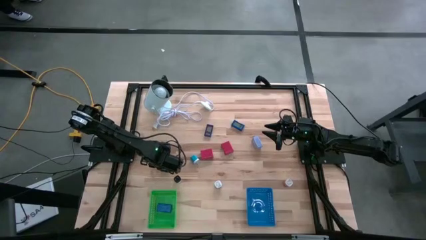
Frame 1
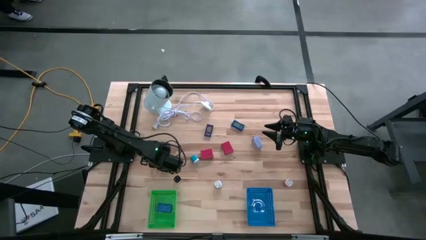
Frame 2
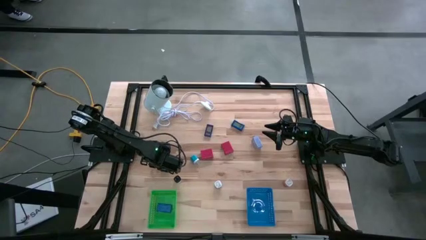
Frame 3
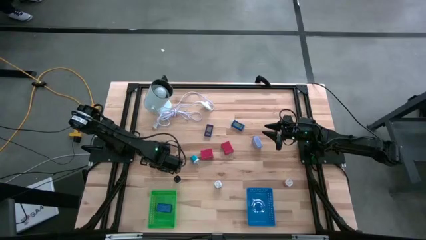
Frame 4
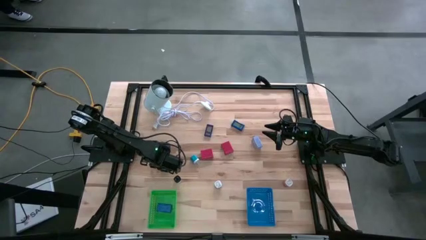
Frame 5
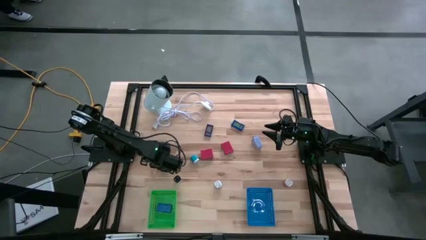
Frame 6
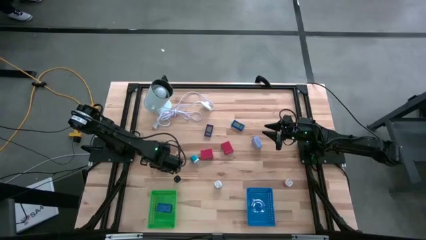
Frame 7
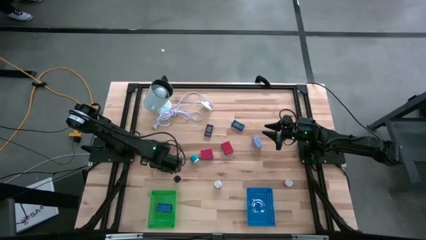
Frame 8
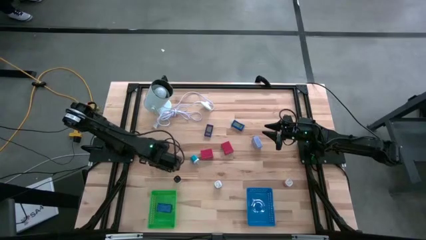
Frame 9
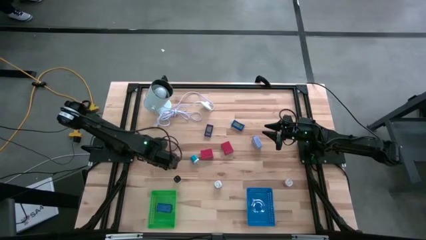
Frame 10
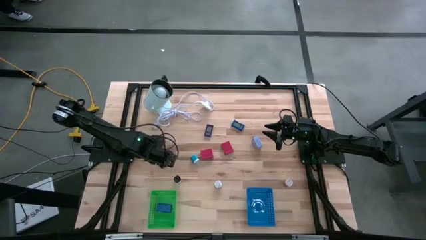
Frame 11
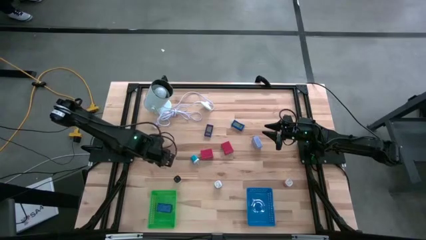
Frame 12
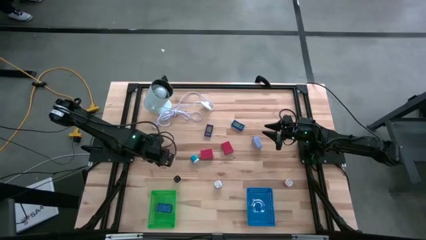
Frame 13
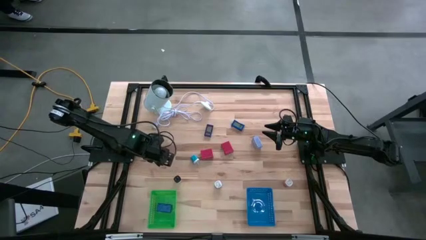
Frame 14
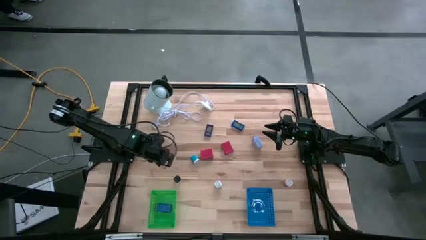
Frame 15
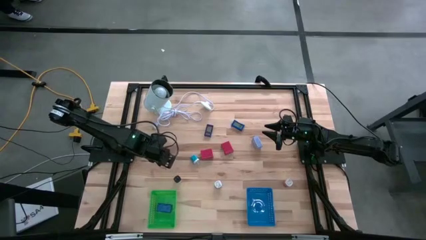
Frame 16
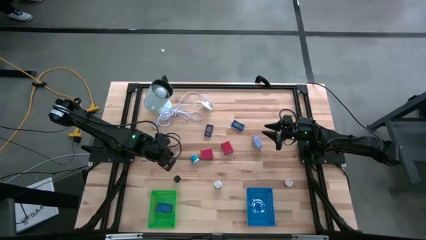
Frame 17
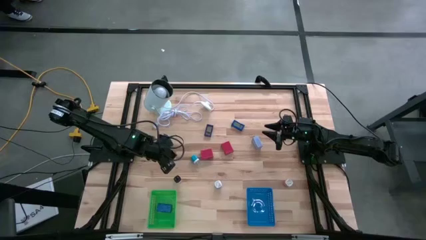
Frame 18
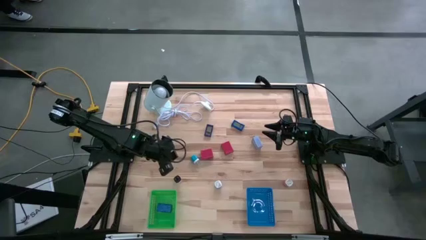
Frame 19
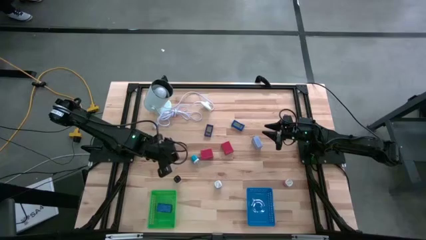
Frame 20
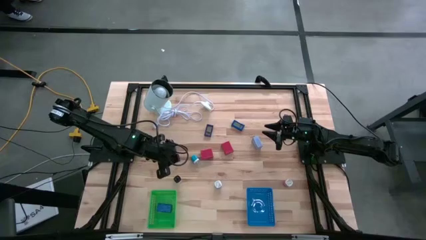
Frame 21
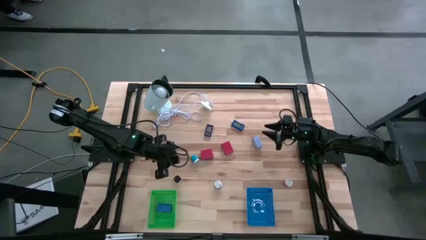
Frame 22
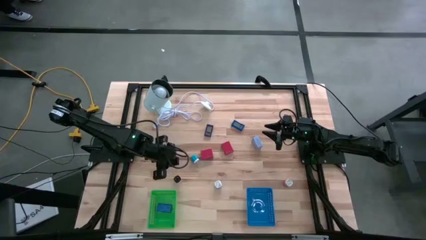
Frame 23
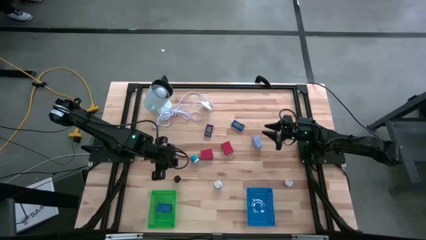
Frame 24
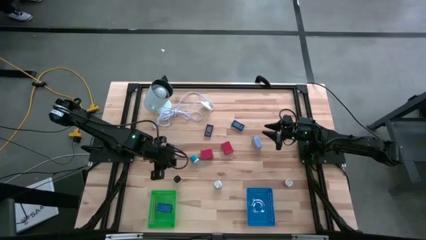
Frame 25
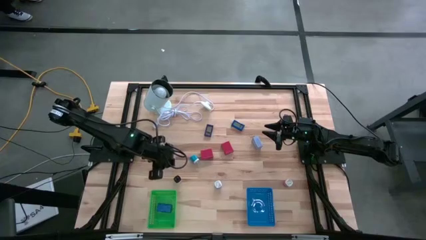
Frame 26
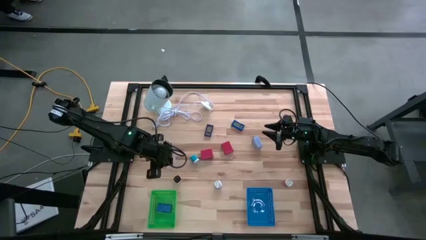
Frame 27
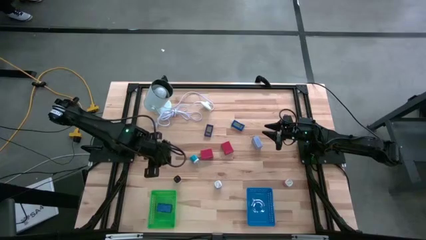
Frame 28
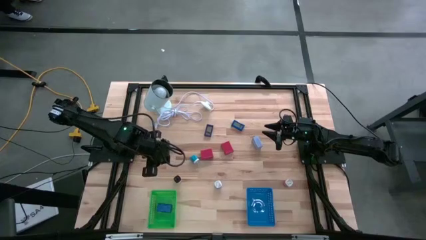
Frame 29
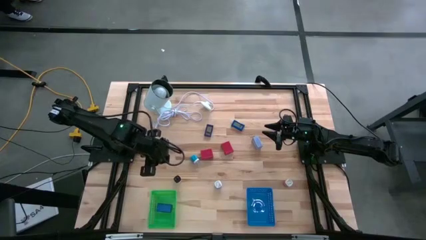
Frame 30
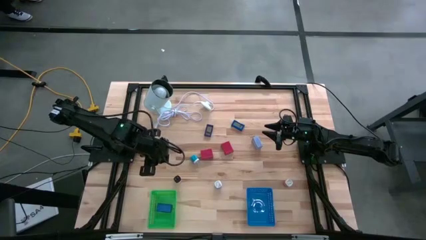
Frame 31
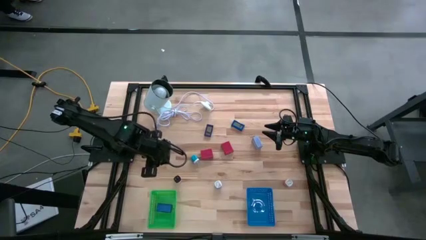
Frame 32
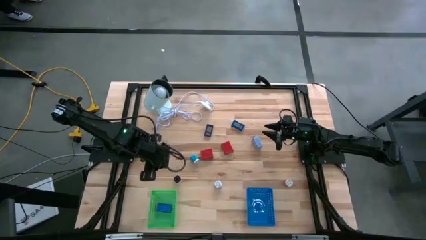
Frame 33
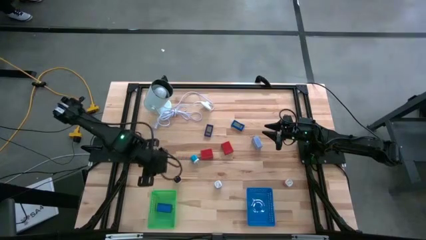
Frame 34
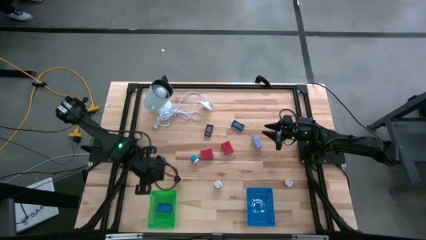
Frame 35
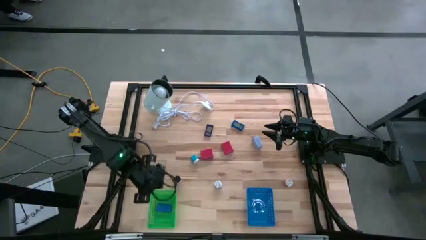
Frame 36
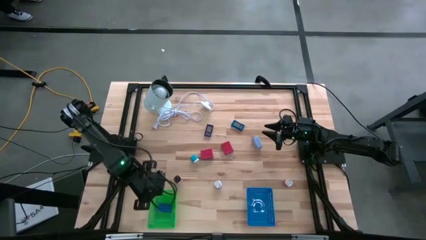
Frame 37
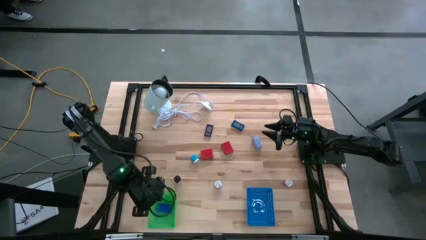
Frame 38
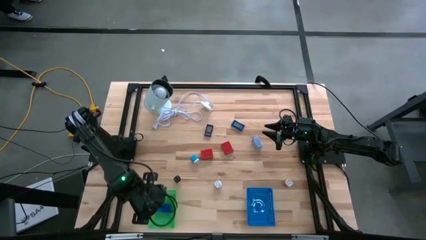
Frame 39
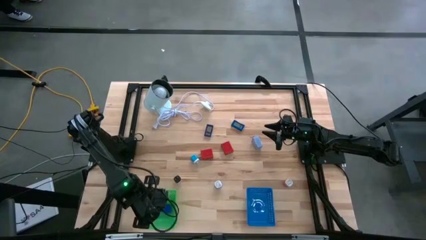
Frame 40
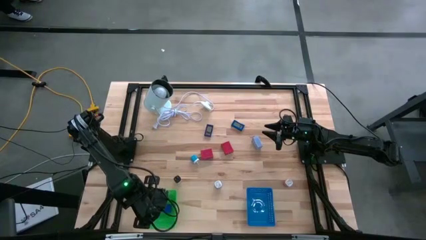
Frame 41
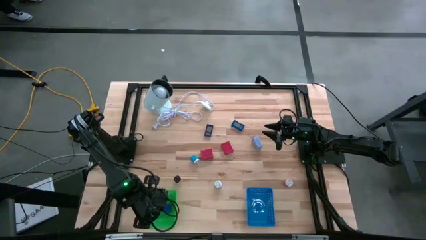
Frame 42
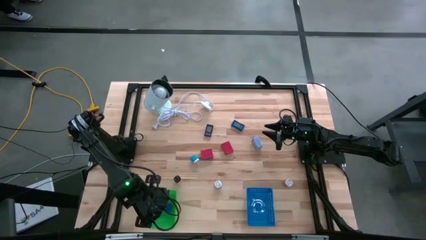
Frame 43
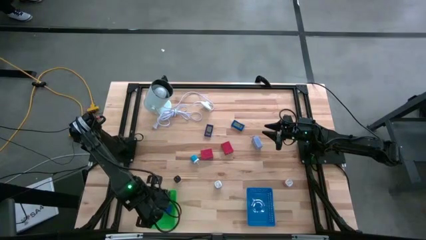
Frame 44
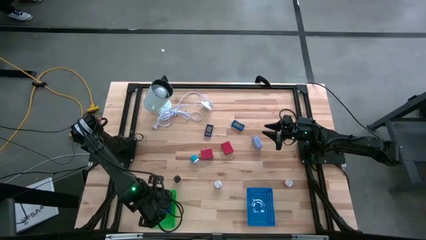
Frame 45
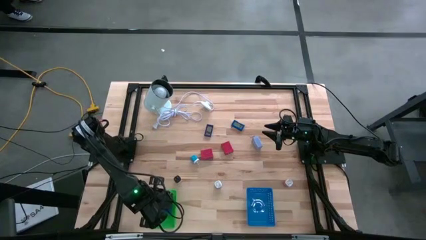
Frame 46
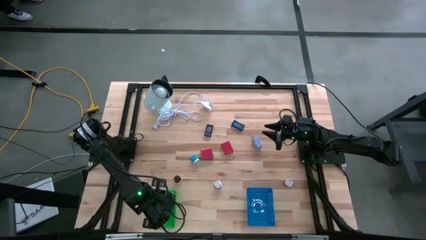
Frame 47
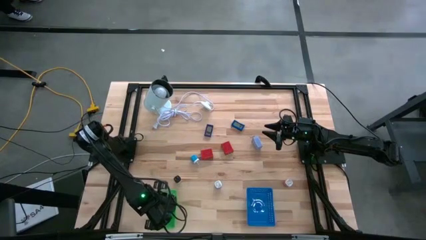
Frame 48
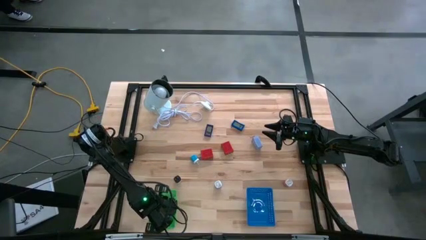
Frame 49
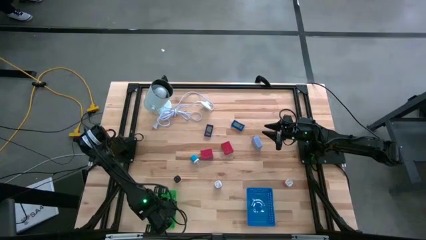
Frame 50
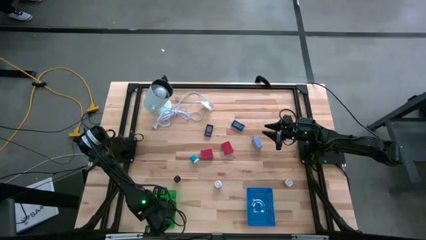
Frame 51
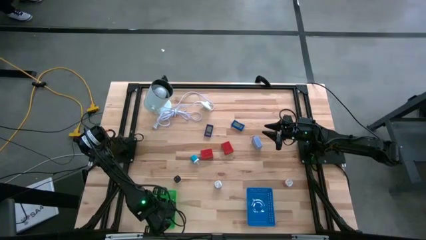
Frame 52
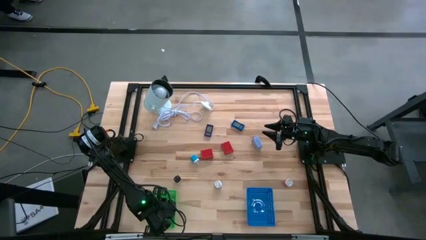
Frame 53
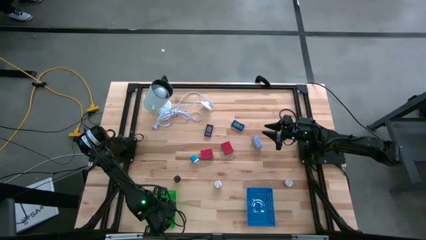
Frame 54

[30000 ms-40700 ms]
Task: Pick & Place Office items
Put the black digital clock into the green bin

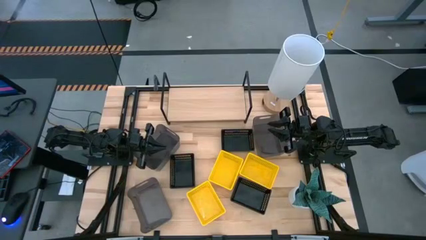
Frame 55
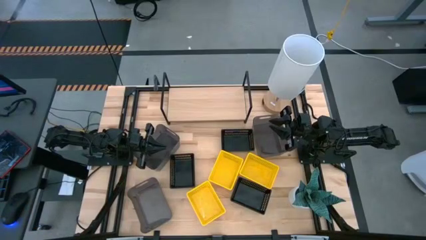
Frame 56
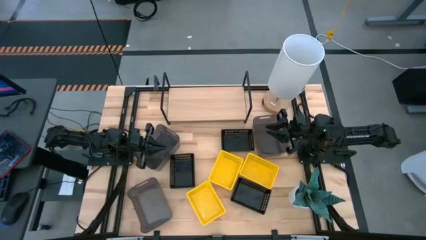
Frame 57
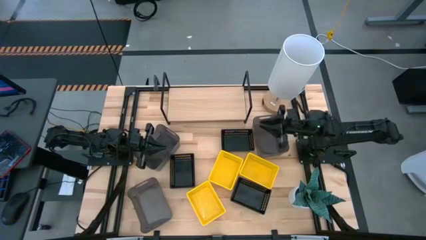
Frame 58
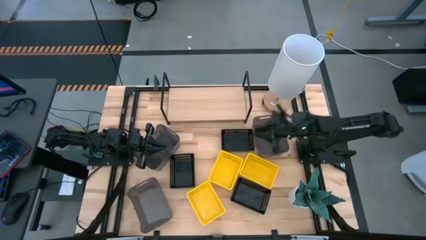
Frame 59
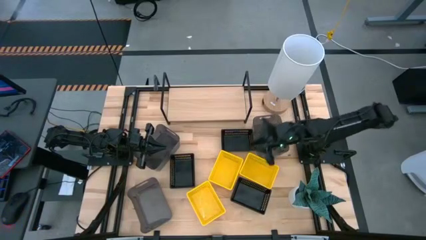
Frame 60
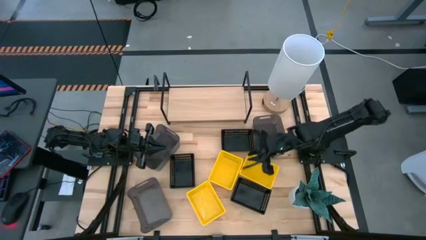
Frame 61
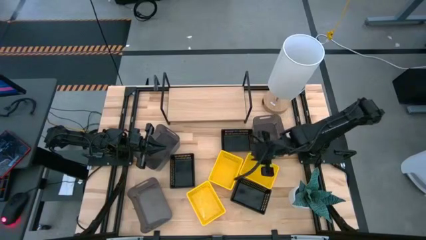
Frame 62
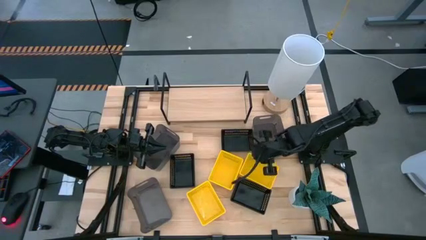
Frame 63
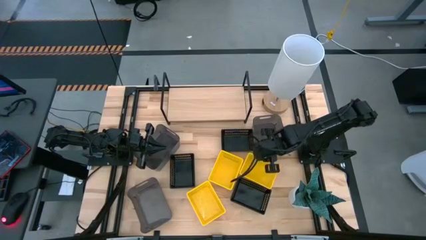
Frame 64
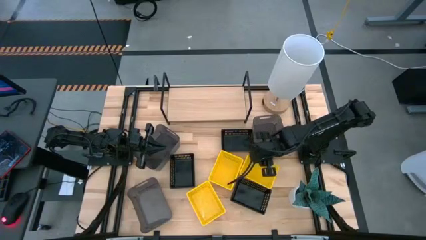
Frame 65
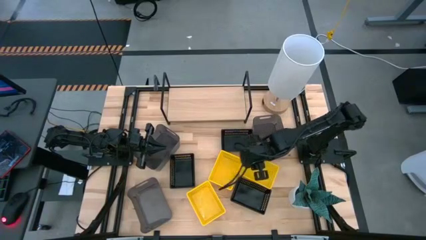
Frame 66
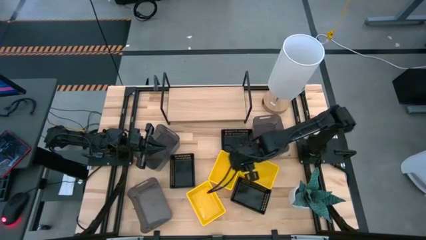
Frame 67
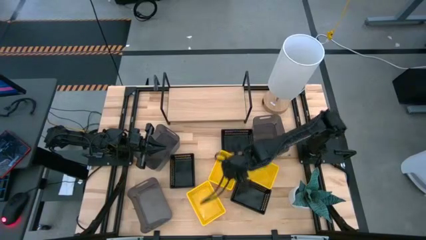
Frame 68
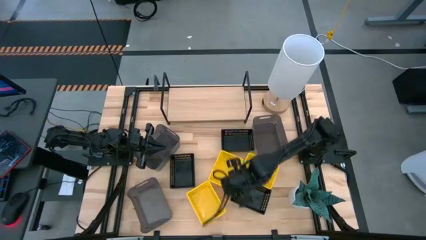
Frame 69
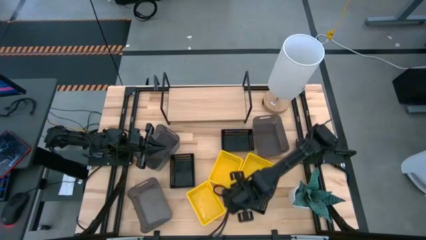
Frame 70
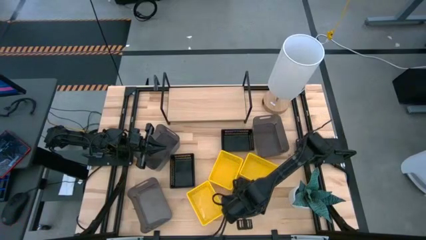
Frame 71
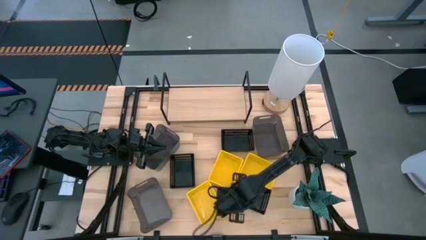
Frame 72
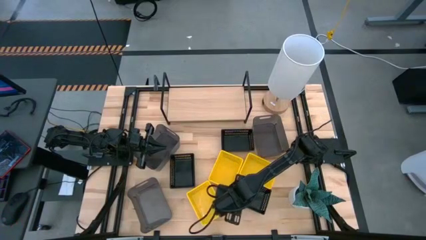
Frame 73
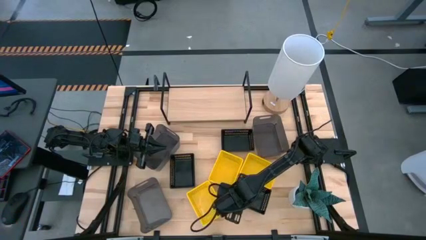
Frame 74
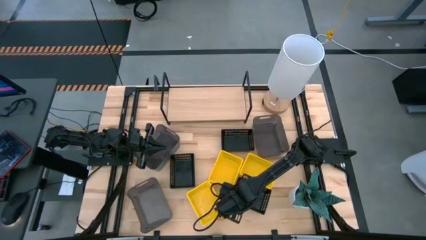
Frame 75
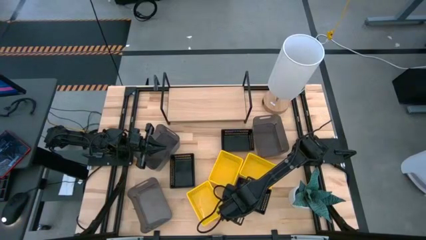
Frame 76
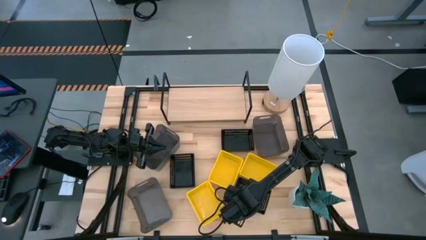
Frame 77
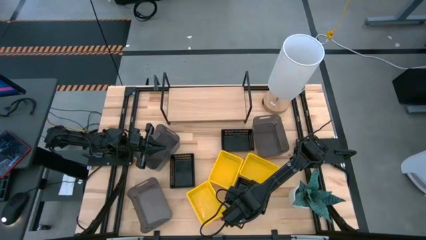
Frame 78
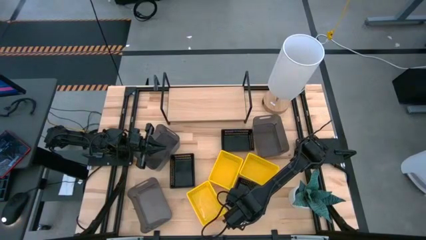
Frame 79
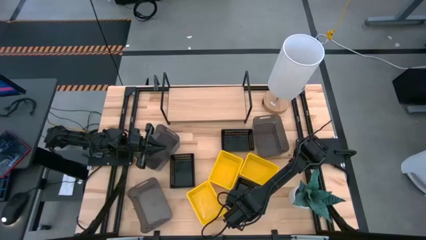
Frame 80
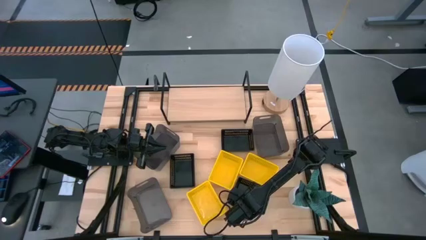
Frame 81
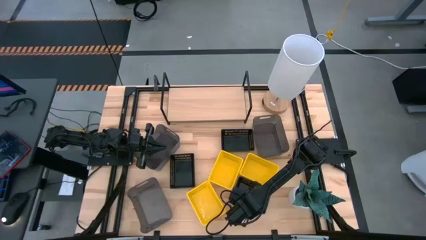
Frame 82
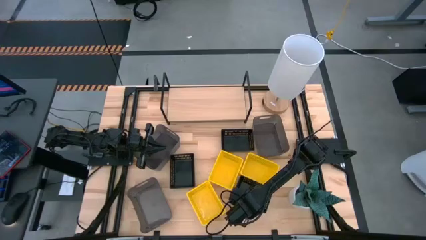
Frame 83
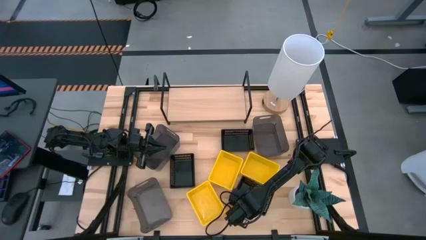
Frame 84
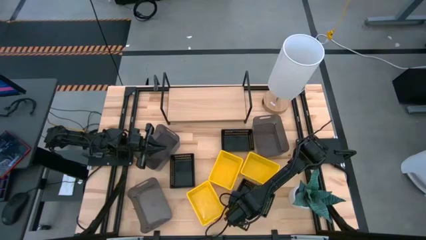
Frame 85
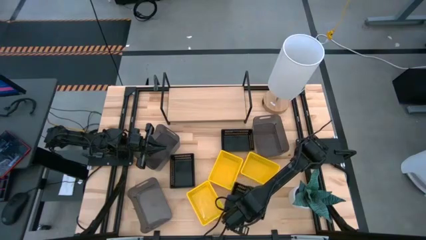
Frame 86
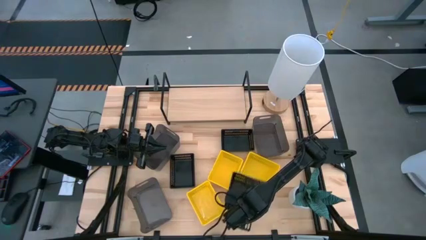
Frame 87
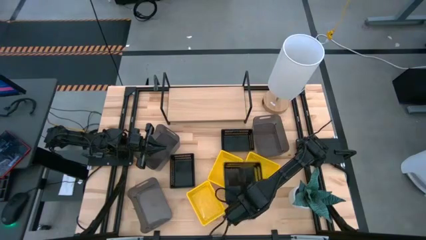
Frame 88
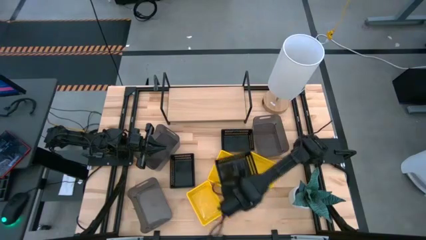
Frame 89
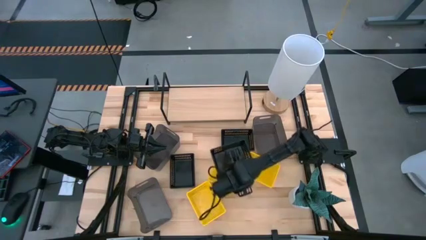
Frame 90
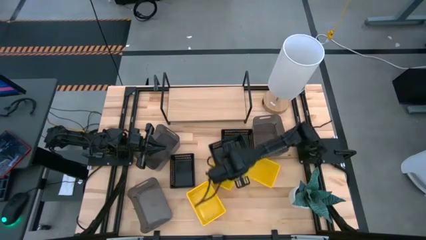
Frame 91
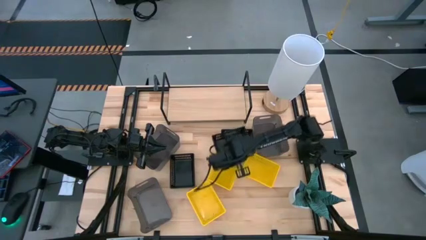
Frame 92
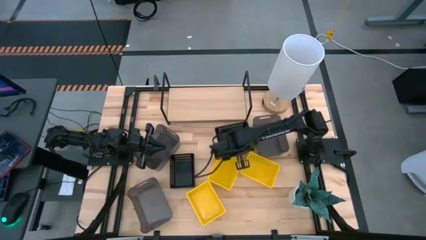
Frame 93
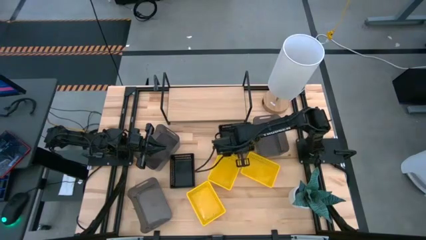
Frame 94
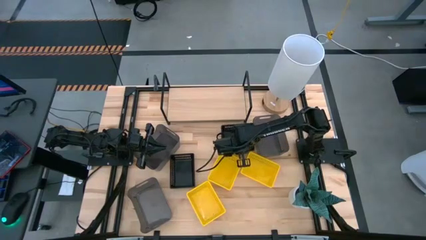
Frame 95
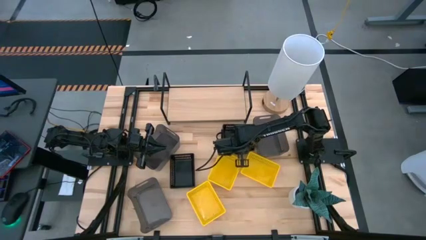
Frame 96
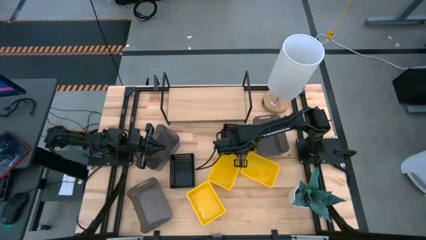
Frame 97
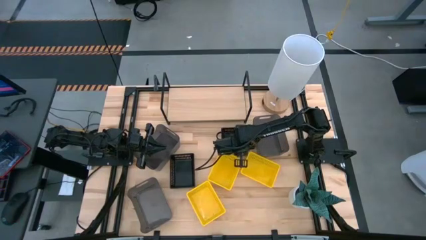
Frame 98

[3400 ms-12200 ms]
Task: Stack baskets on shelf by color
Stack the bottom right black bin on top of the right black bin
